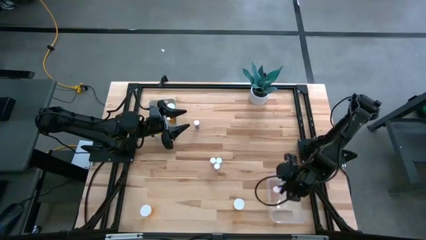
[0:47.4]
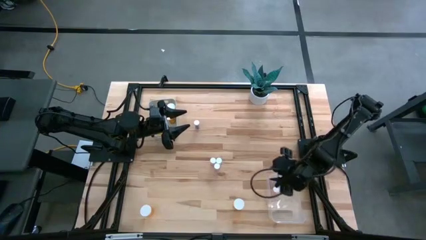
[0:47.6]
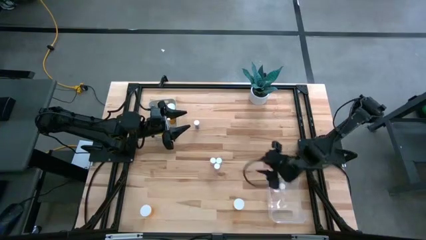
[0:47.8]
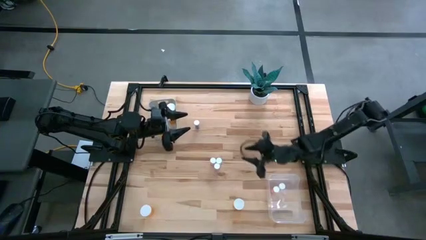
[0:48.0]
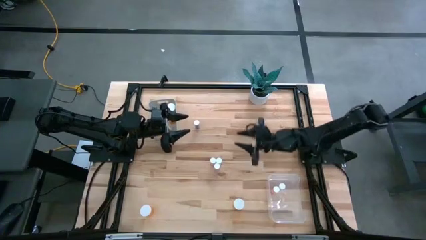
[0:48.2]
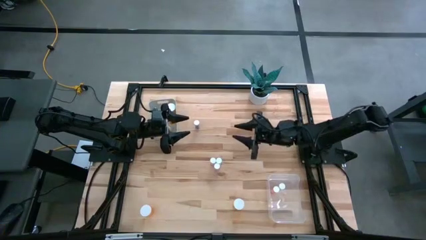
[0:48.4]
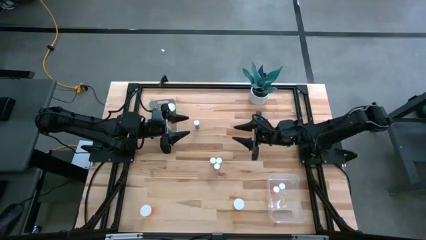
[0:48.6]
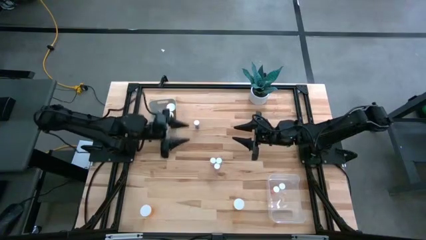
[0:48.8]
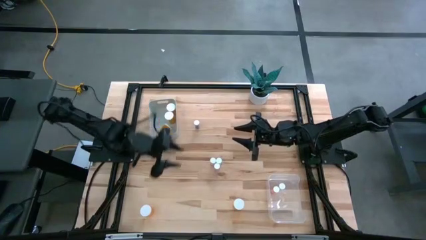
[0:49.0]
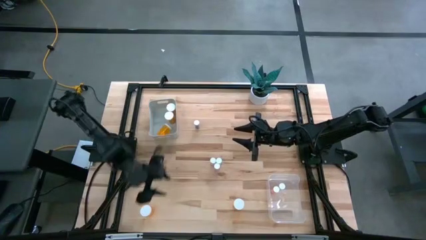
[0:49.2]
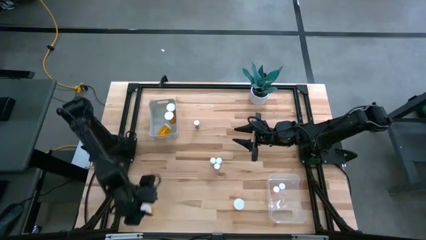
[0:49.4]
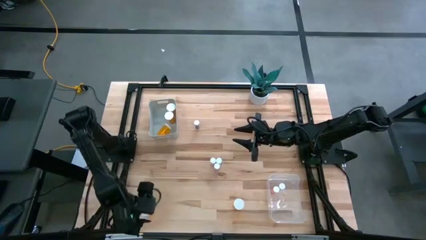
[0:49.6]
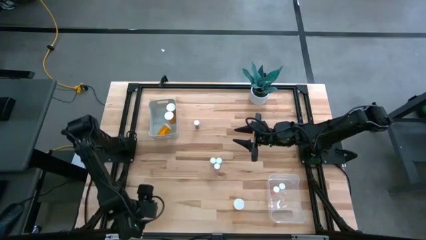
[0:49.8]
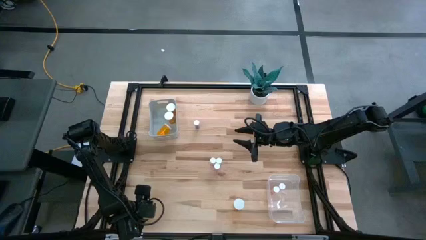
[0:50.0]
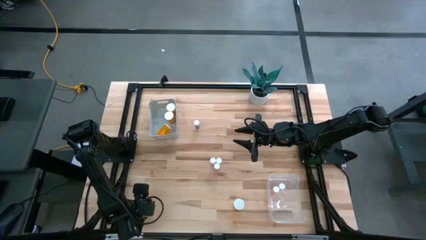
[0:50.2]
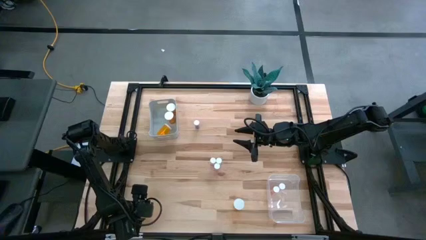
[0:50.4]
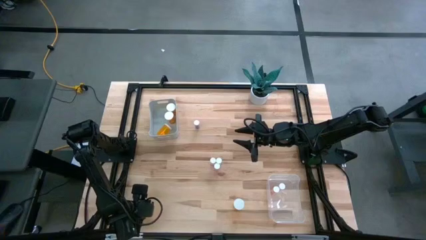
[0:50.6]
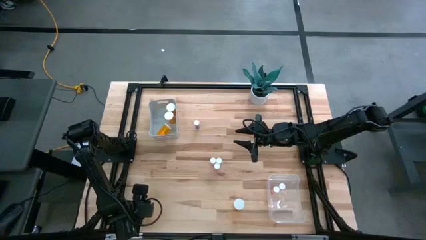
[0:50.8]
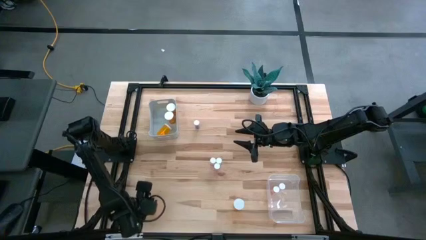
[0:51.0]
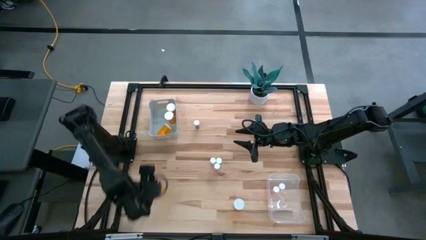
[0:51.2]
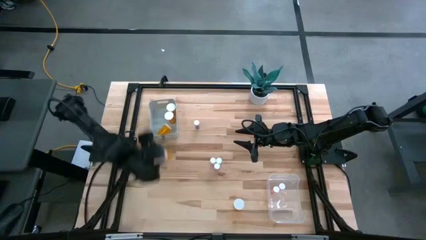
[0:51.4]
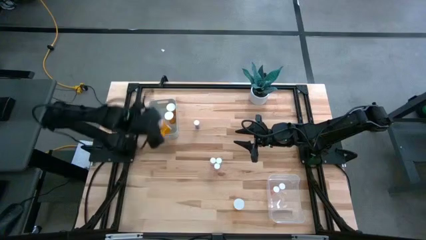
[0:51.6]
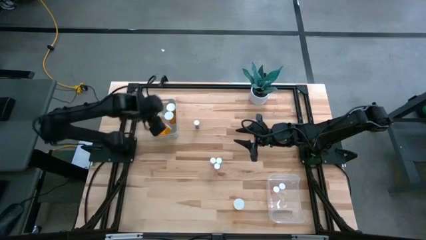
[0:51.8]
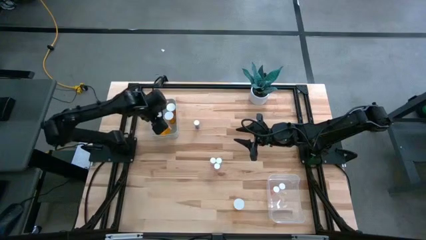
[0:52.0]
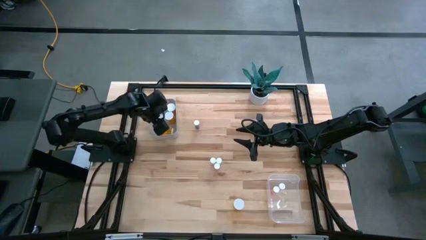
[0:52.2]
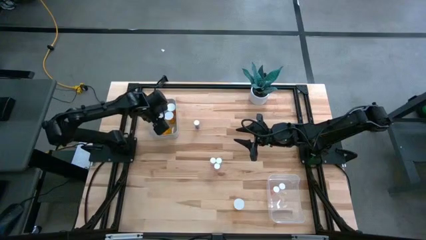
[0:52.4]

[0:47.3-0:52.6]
Task: Pick and place medicine bottles into bin by pill shape (circle, oval)
Put the left orange capsule bottle into the gray bin

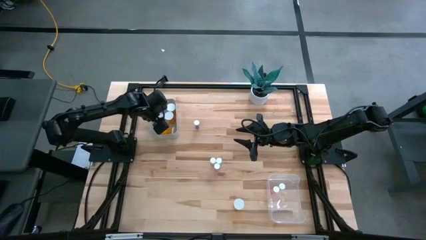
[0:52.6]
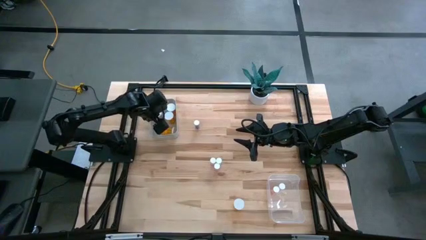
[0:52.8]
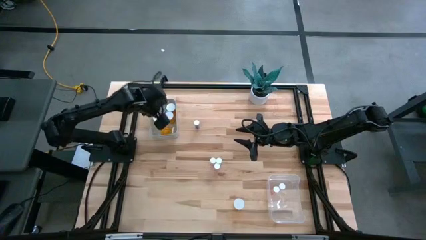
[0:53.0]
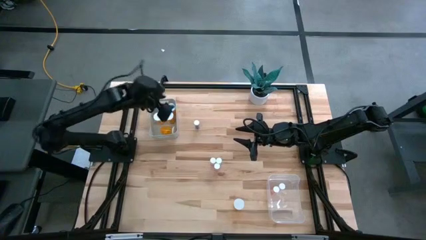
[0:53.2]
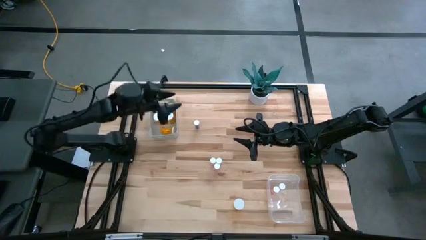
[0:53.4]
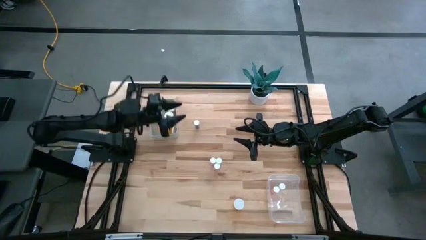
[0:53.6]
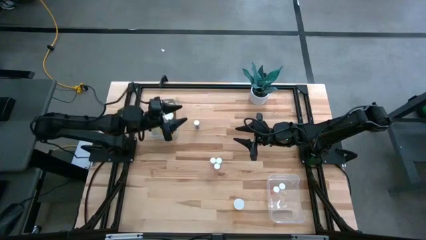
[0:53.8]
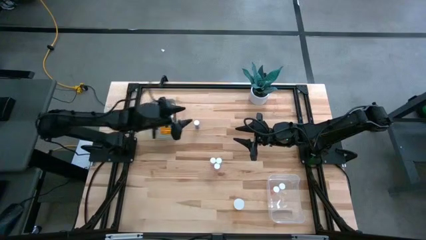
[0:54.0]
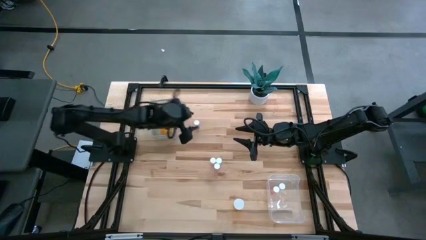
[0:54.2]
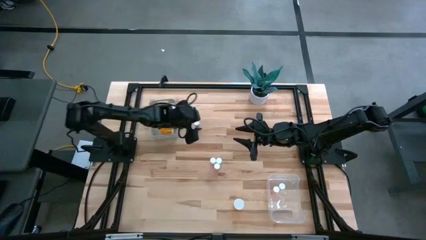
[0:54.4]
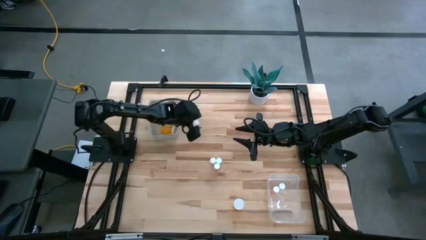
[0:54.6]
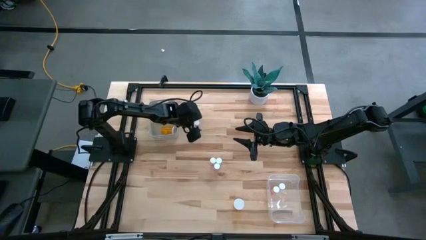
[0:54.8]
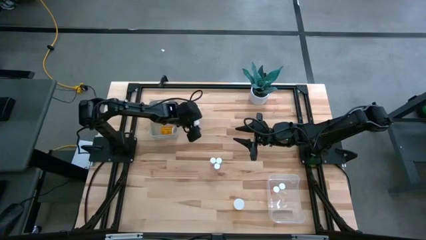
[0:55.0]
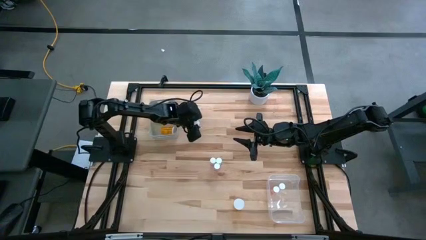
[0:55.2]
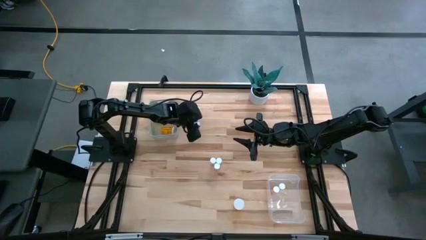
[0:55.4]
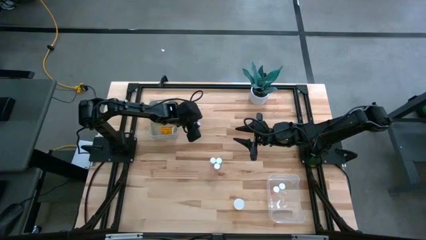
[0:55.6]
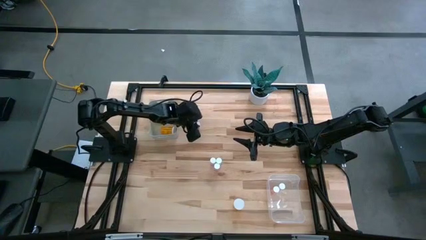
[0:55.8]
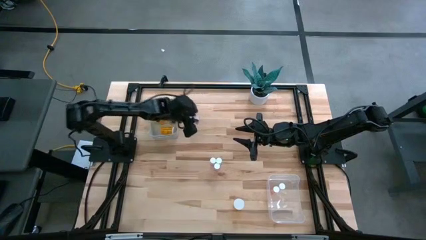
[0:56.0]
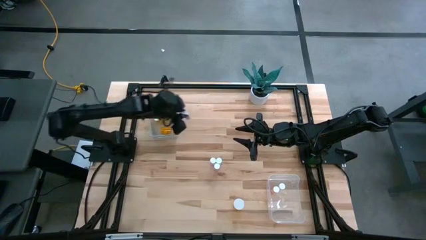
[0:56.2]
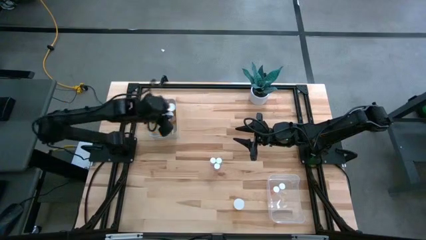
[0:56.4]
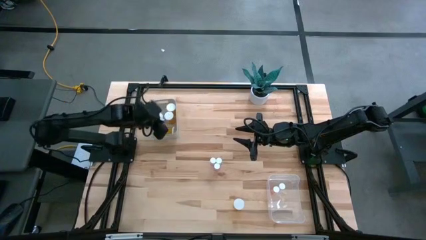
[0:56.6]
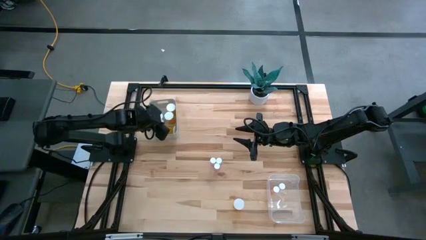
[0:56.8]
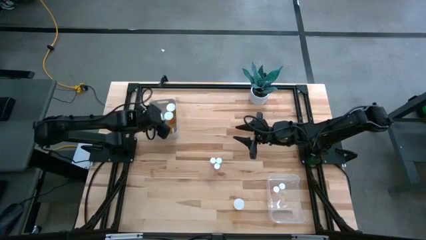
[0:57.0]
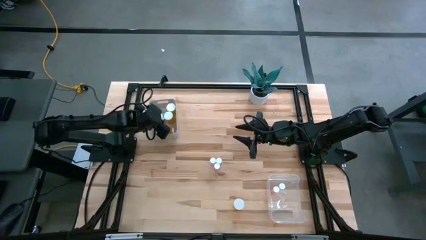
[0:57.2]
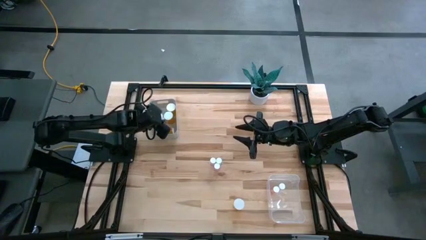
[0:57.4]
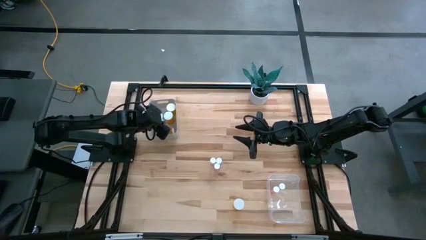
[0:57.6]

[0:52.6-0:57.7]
Put the blue capsule bottle into the gray bin

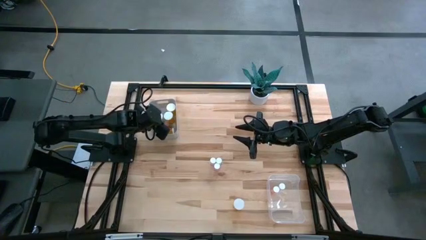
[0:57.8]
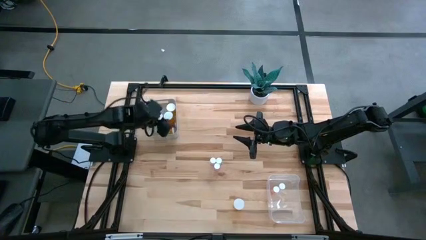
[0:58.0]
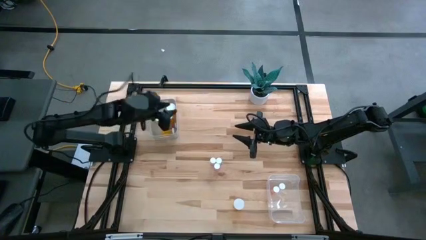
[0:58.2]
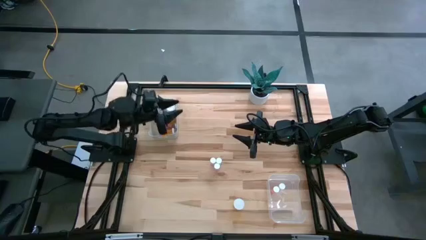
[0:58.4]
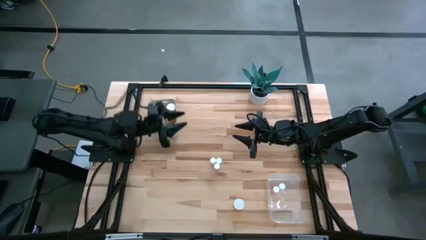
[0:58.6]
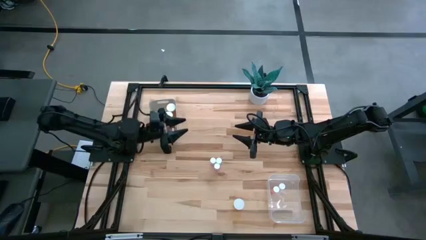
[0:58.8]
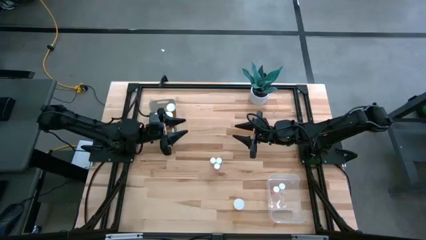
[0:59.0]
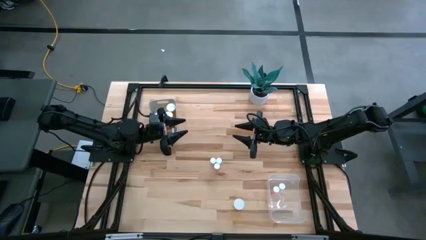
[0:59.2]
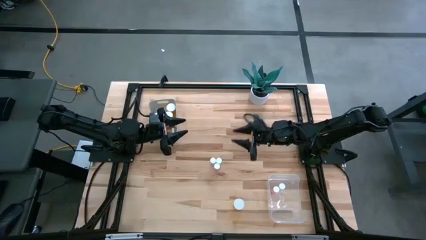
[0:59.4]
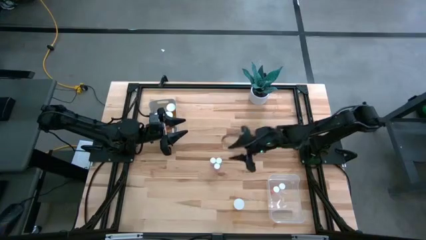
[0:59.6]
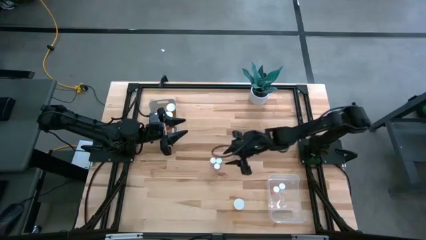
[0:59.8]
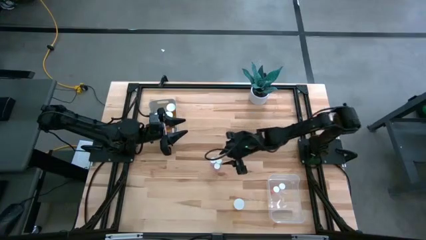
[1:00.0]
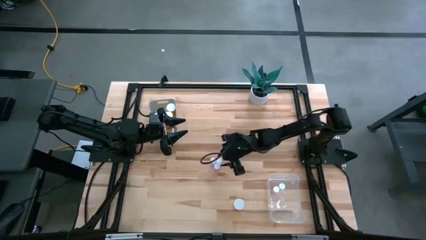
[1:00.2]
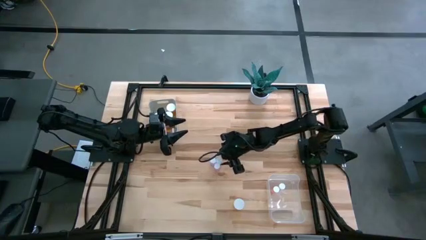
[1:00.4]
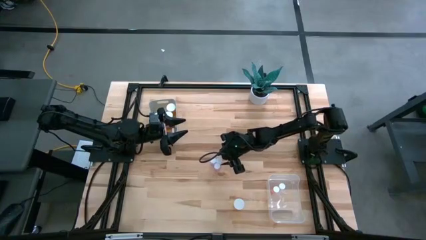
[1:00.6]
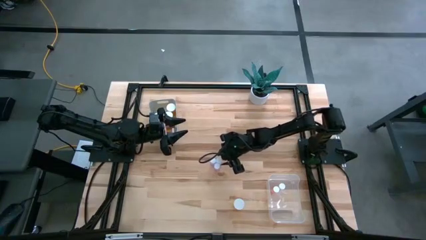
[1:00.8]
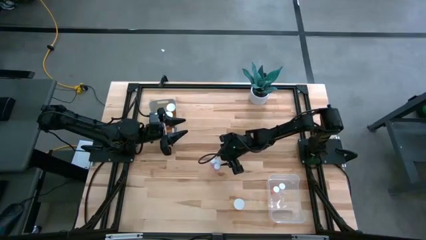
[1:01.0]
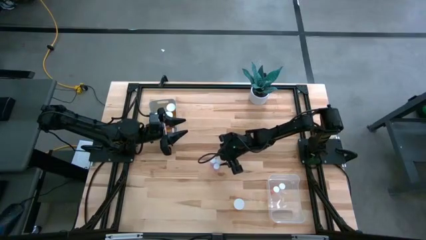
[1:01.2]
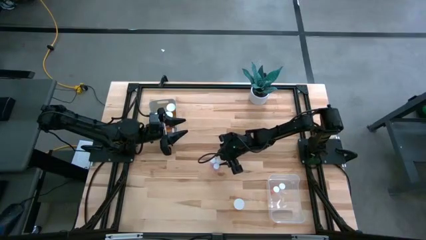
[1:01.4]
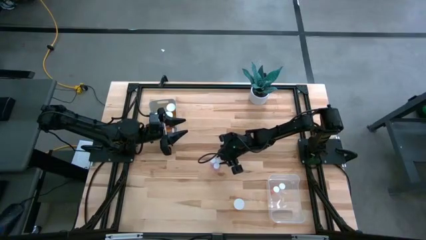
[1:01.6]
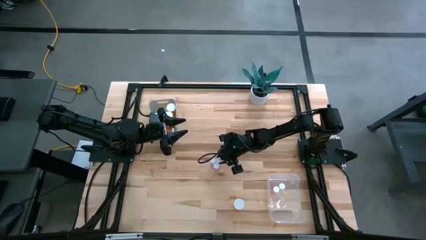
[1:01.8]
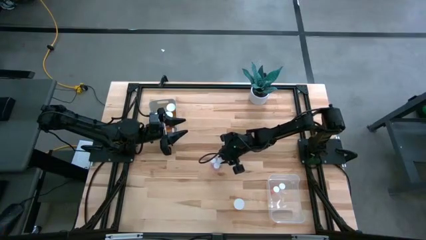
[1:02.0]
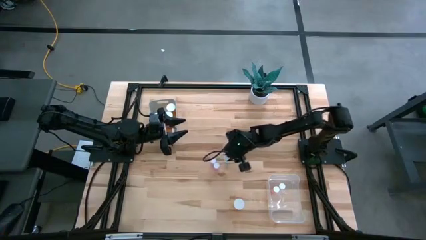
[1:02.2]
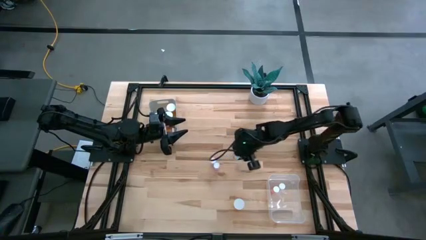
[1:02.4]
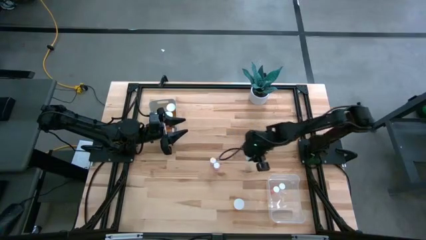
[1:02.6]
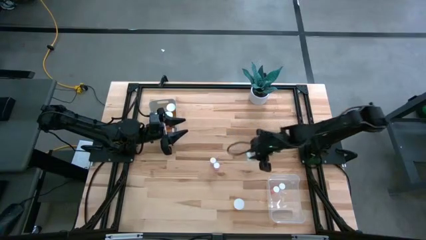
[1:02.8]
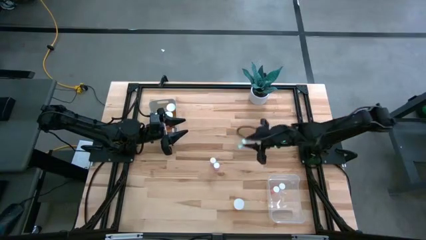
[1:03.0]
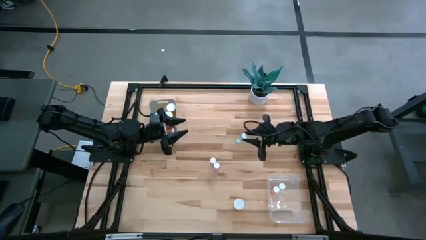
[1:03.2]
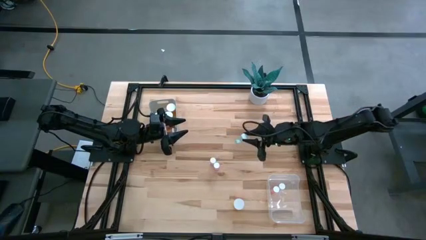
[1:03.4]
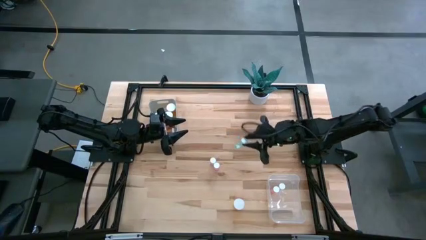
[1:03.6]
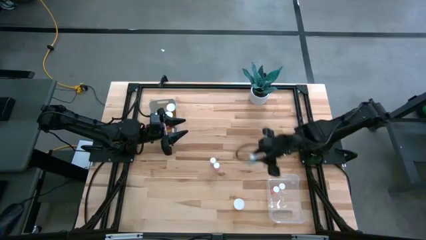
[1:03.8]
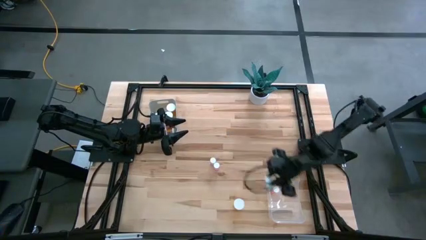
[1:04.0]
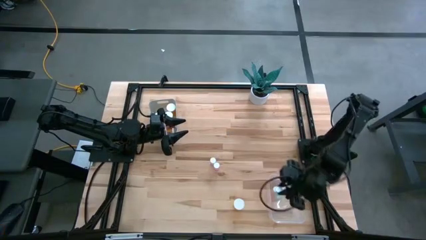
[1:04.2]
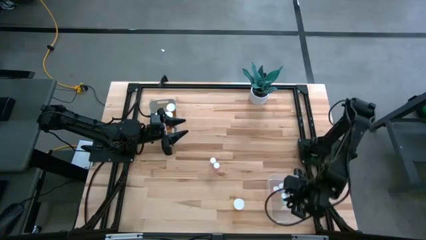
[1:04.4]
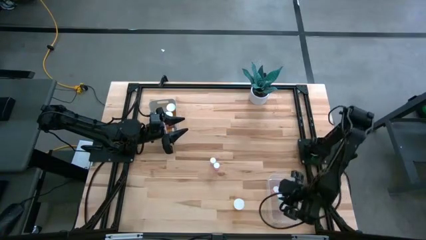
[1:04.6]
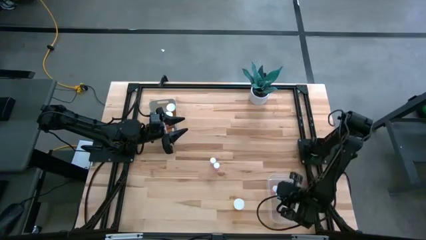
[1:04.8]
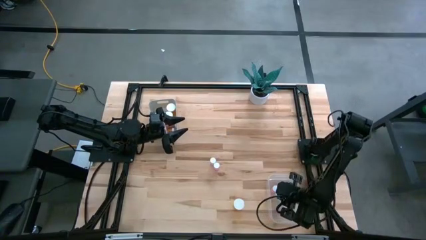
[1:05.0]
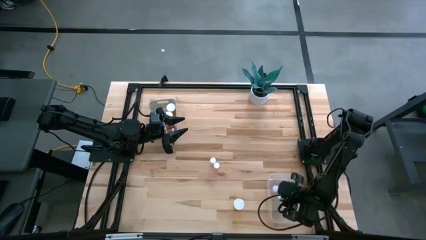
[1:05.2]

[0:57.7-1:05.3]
Put the blue tablet bottle into the transparent bin
